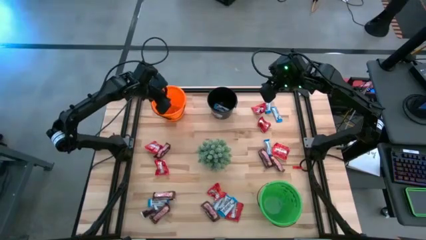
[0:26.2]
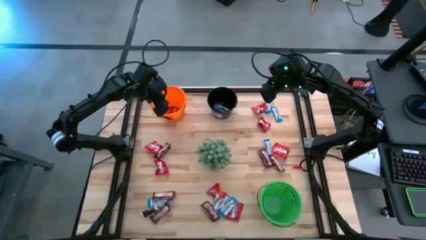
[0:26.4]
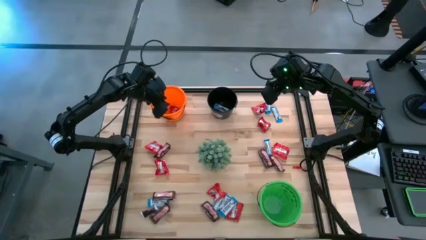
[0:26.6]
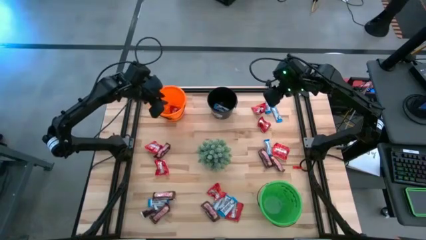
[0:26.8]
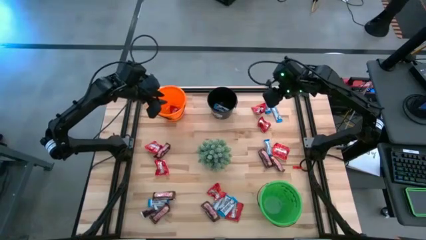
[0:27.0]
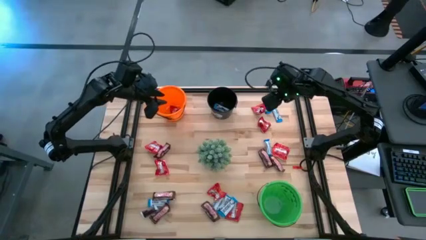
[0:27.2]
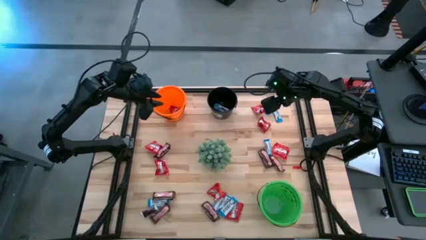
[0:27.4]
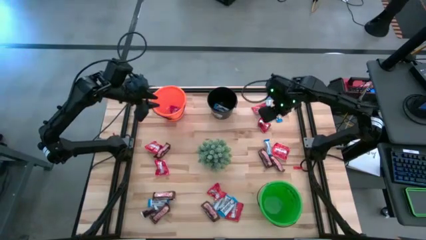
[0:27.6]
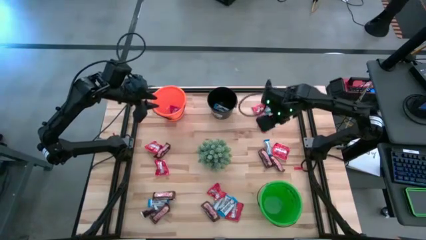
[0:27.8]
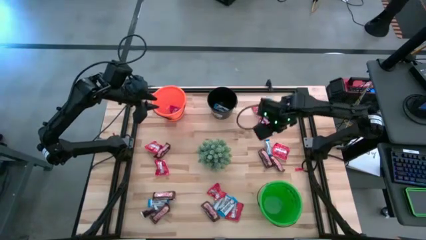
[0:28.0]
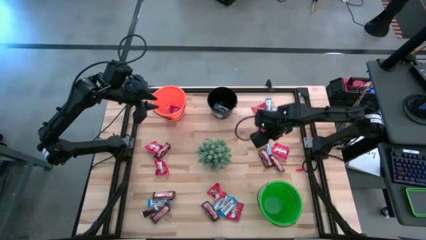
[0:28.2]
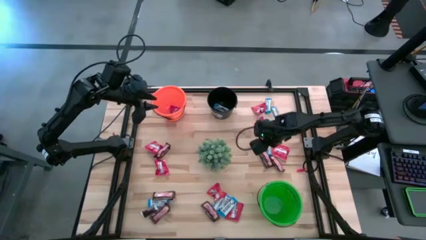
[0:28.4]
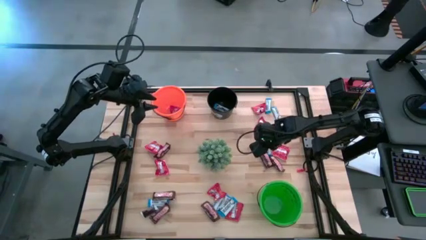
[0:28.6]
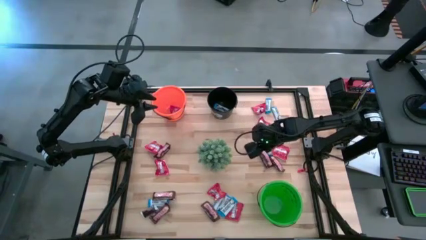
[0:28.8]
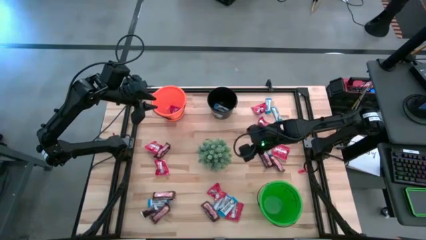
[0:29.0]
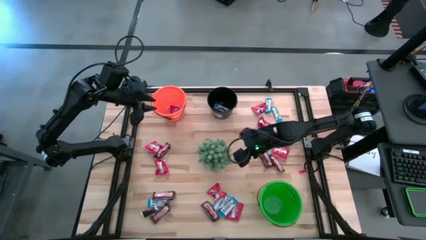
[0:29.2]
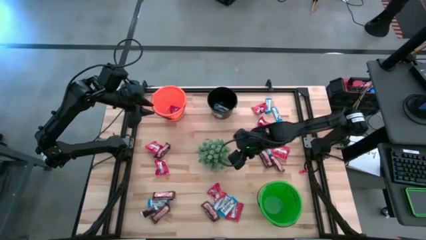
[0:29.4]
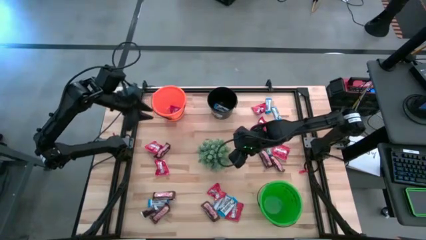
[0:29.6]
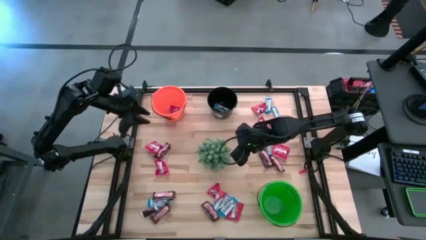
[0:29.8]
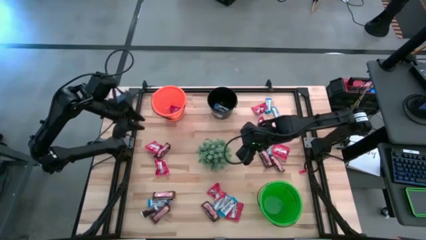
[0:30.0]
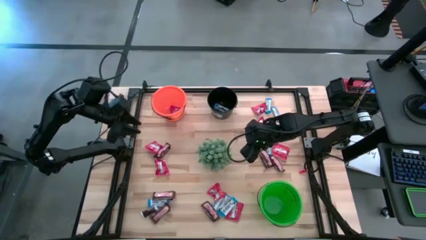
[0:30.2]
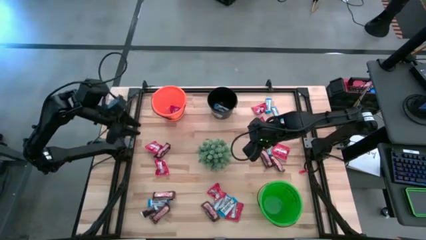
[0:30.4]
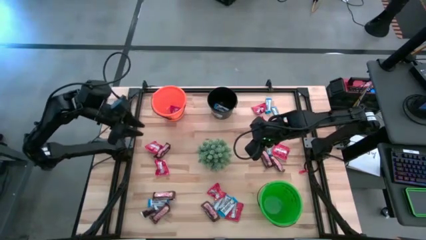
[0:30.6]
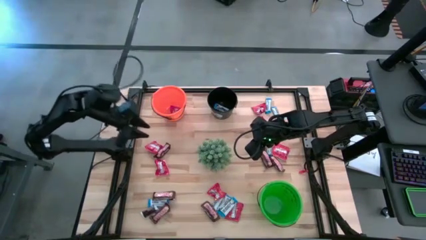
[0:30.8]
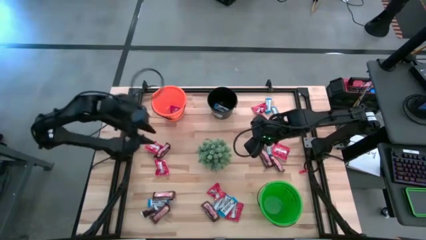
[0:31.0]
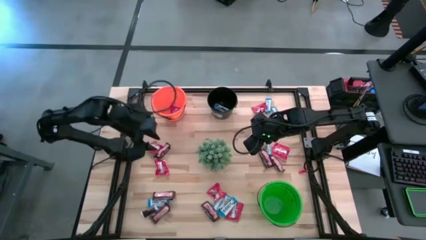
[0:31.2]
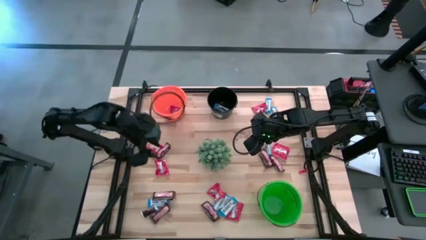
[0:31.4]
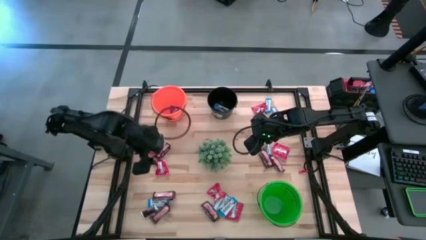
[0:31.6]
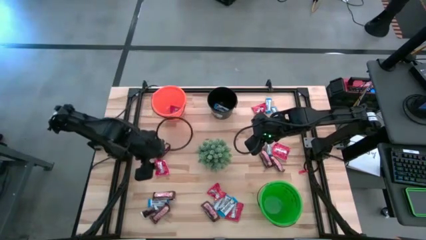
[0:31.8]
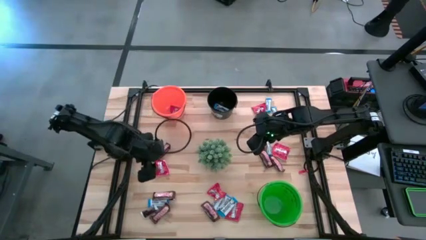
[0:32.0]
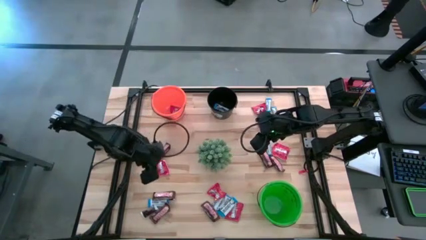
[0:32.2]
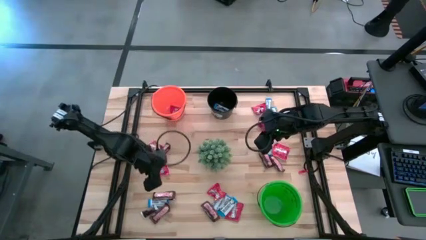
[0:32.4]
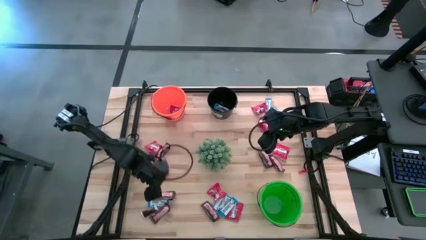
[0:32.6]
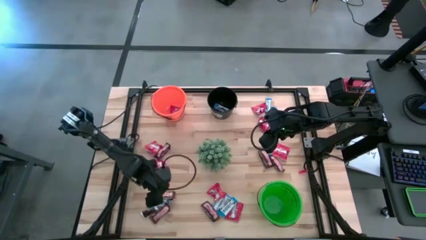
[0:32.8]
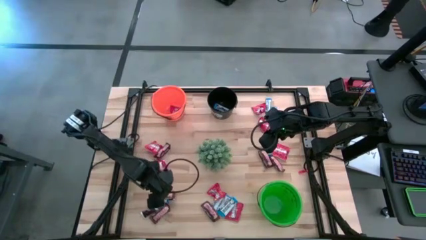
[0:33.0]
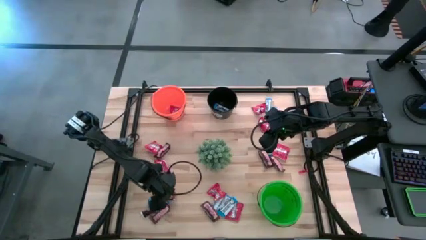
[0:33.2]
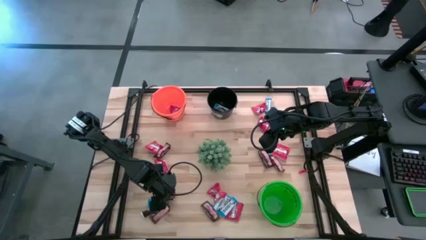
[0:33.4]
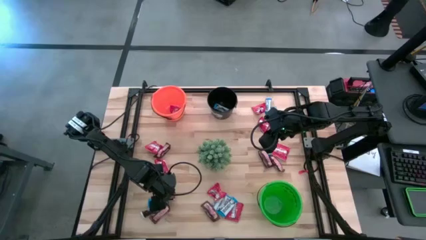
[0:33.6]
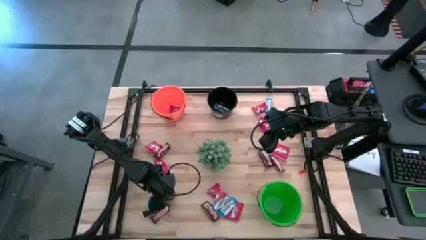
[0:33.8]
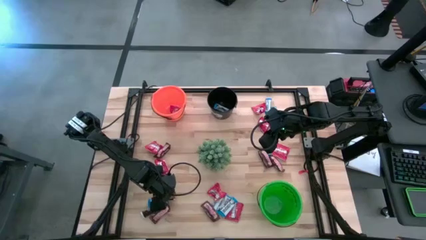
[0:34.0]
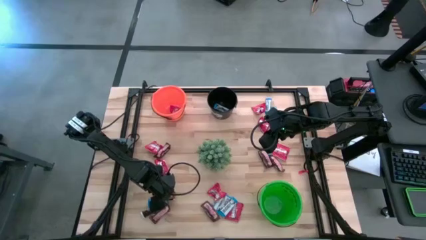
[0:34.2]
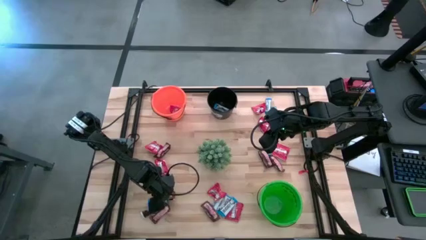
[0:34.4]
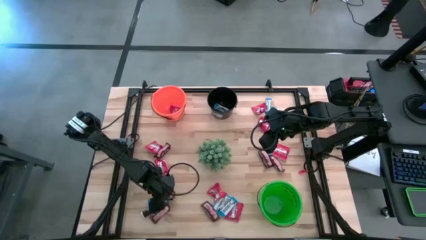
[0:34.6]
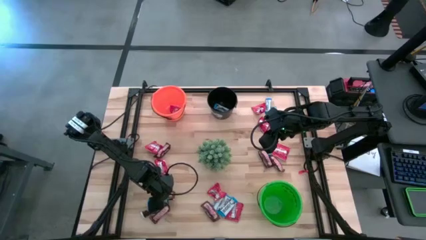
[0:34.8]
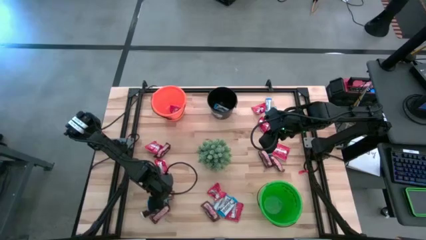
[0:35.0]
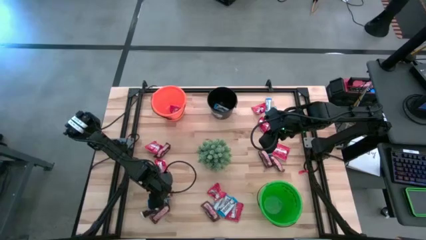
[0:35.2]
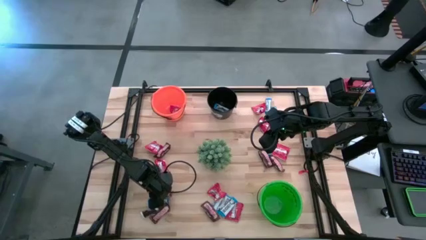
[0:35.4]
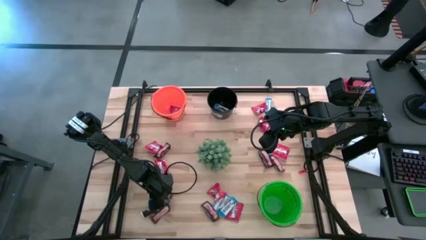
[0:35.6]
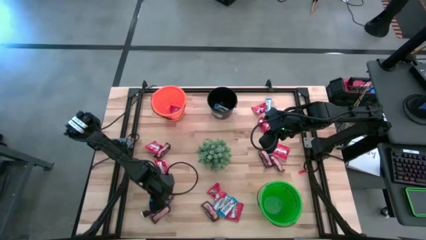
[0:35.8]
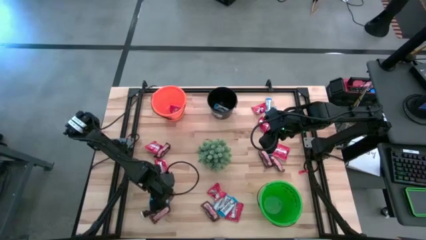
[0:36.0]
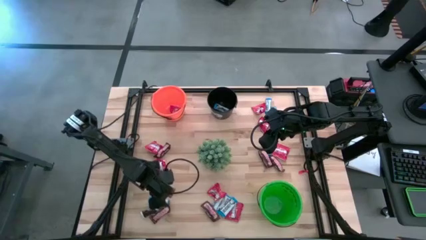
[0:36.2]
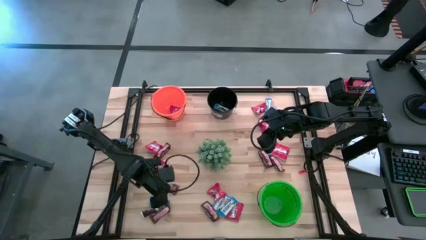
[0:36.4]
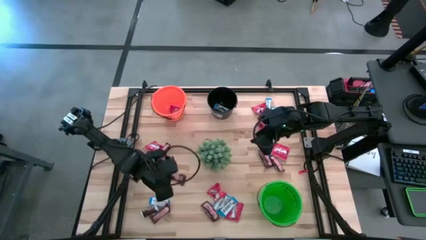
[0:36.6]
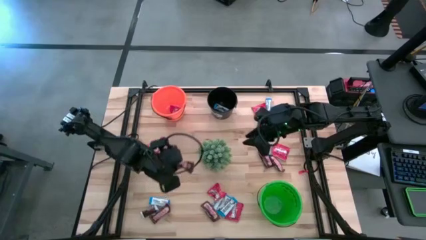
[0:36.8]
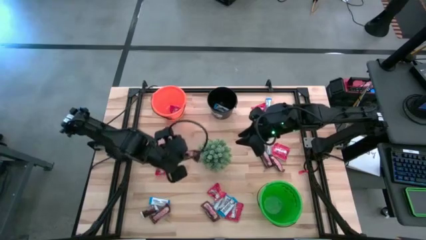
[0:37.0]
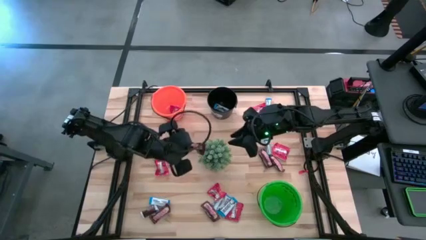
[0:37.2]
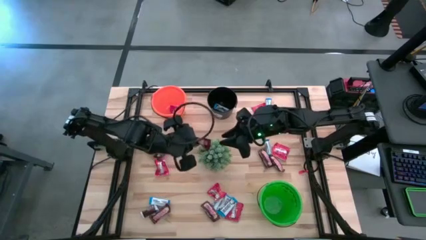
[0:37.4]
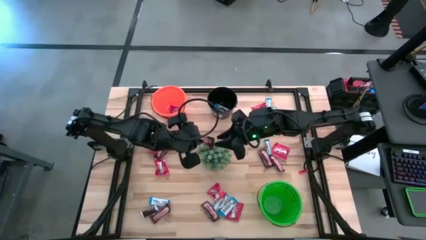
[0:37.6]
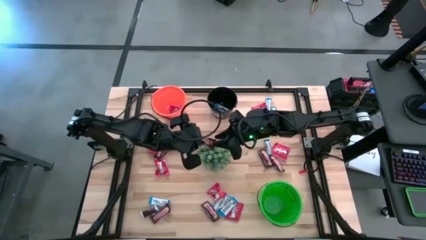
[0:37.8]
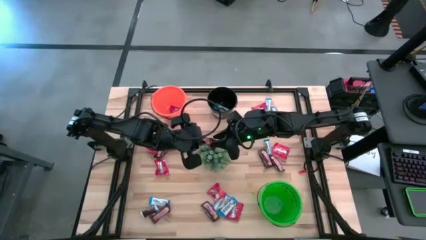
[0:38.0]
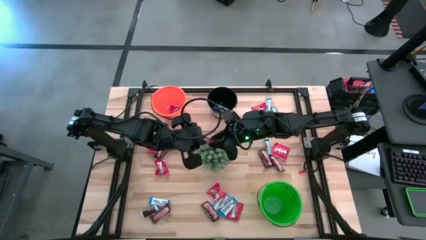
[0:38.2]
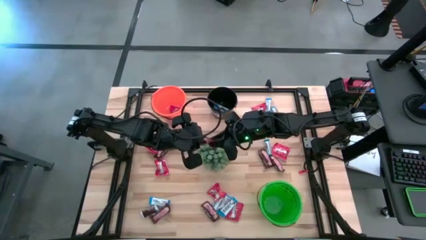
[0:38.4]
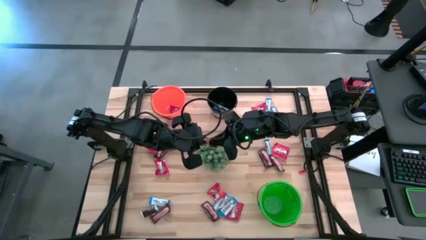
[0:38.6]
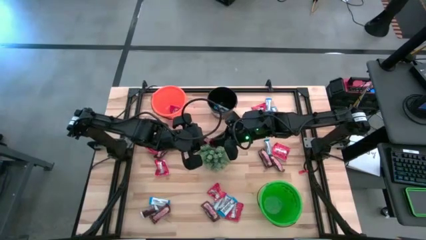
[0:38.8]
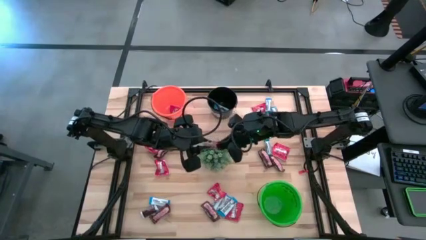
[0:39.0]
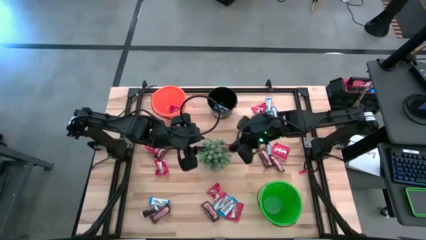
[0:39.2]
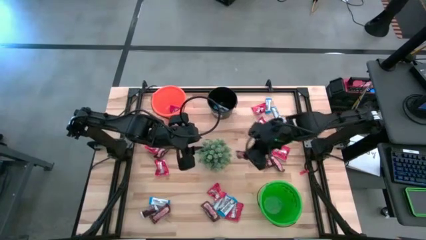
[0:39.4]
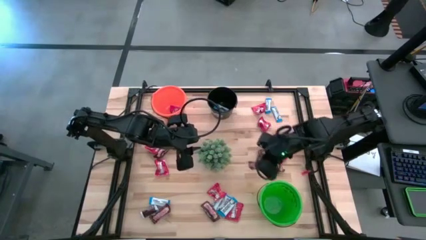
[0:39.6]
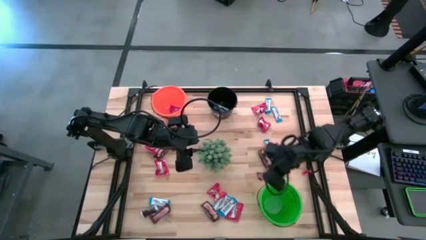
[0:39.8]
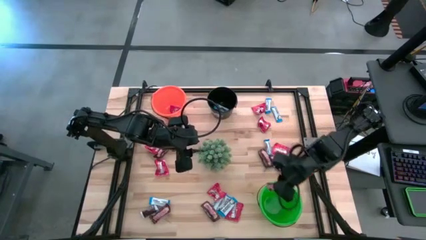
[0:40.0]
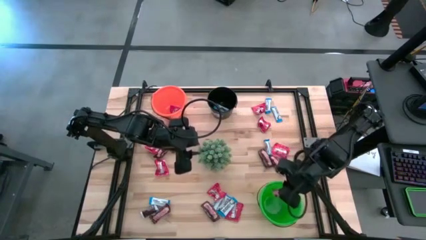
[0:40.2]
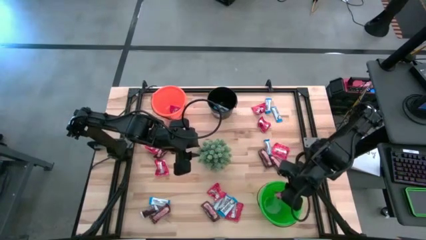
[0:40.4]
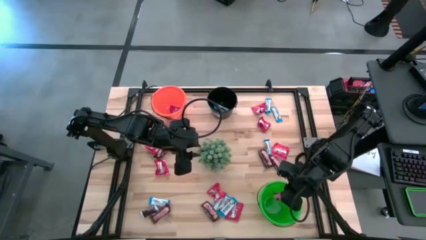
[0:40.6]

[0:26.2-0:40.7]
Task: Organize candy in baskets
Put the brown chocolate bar into the green bucket
